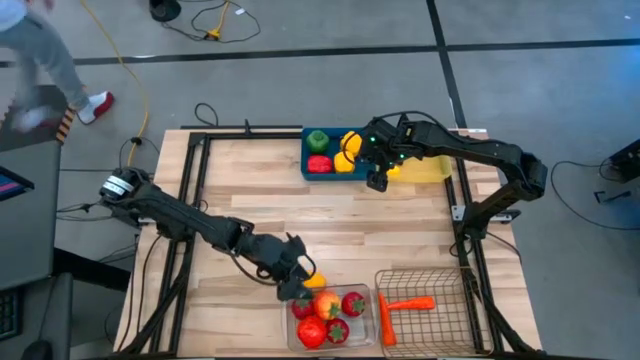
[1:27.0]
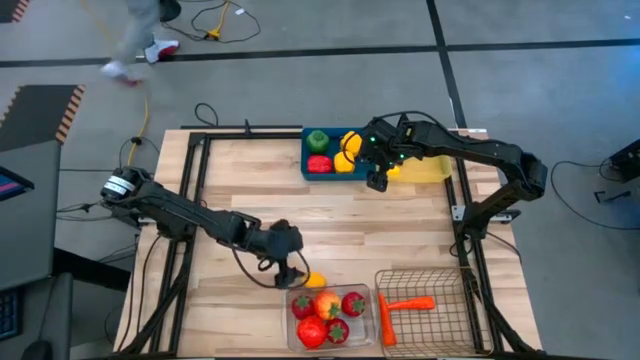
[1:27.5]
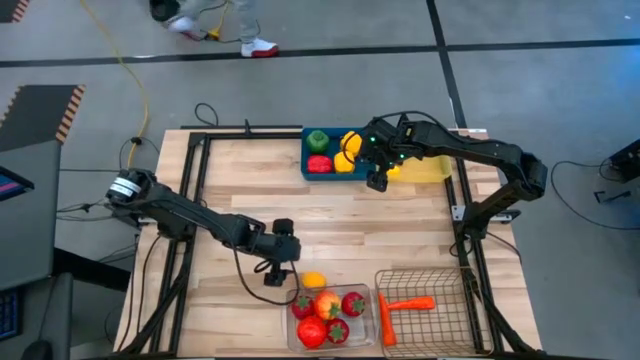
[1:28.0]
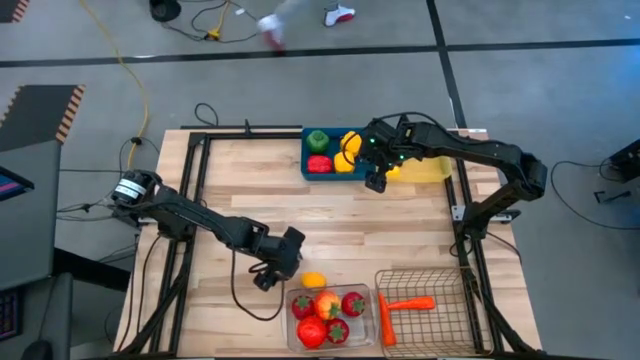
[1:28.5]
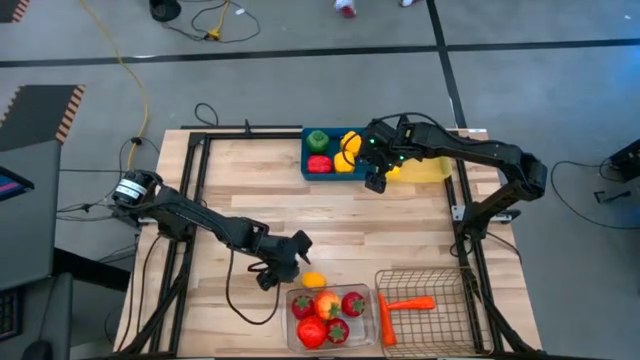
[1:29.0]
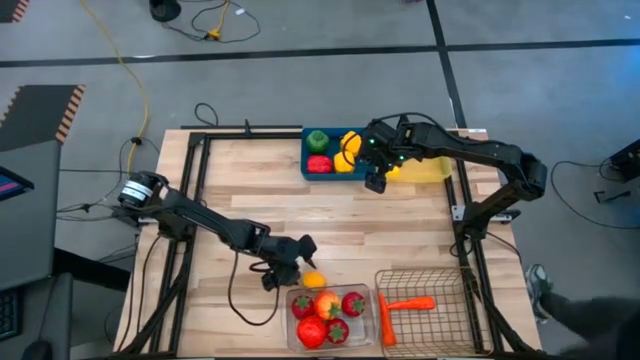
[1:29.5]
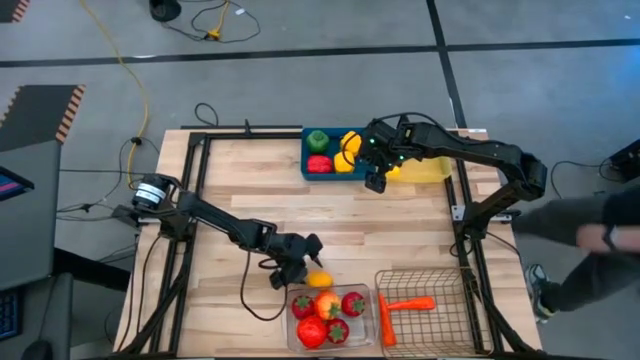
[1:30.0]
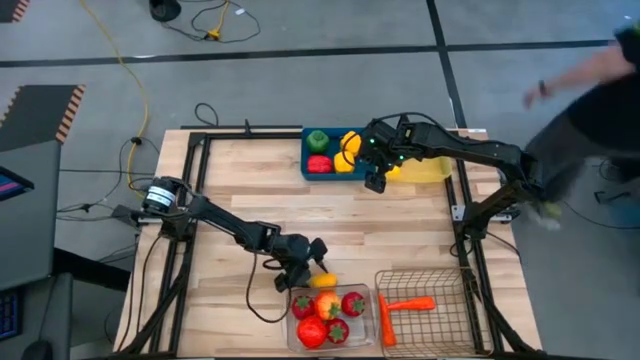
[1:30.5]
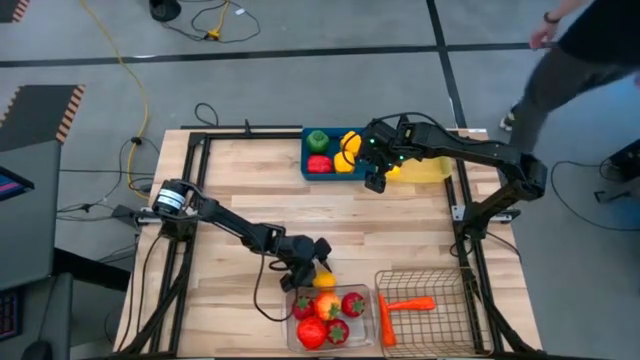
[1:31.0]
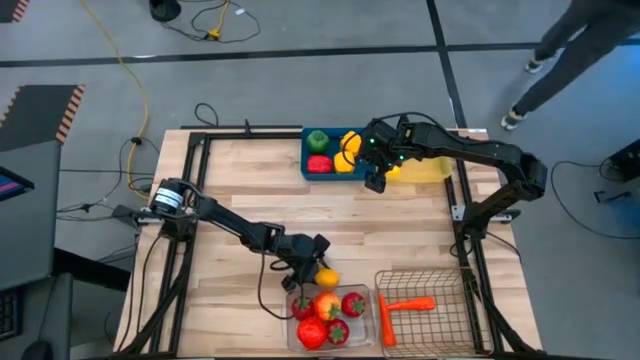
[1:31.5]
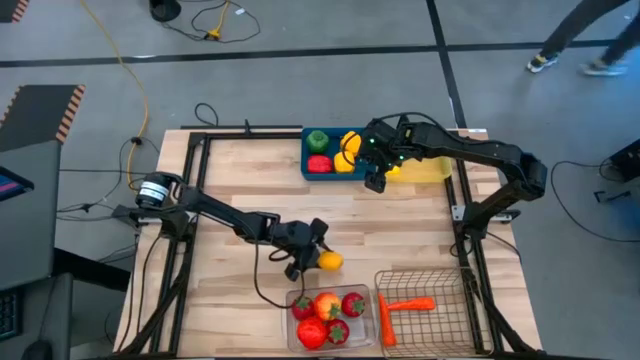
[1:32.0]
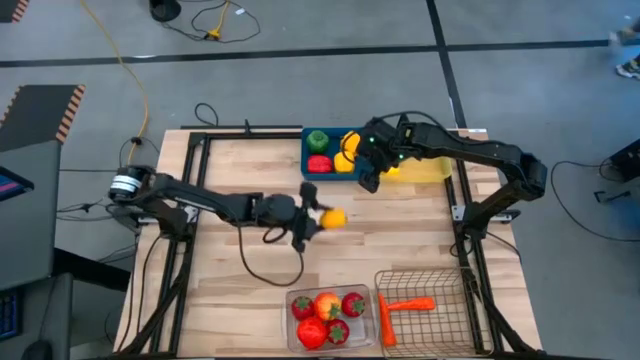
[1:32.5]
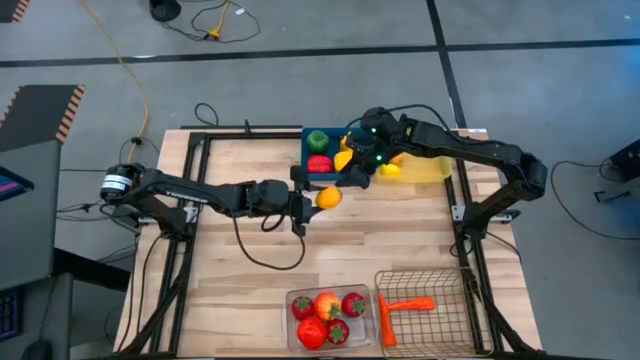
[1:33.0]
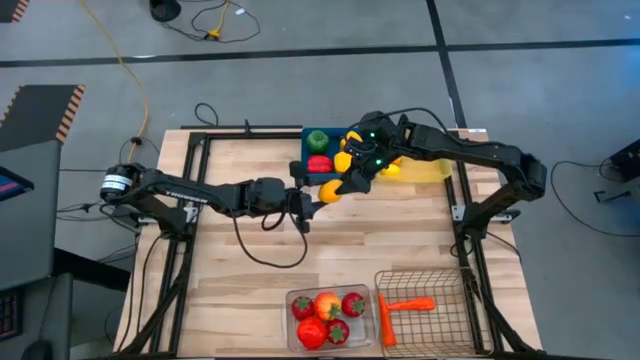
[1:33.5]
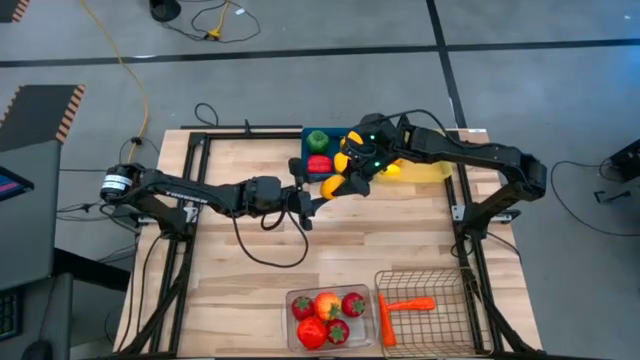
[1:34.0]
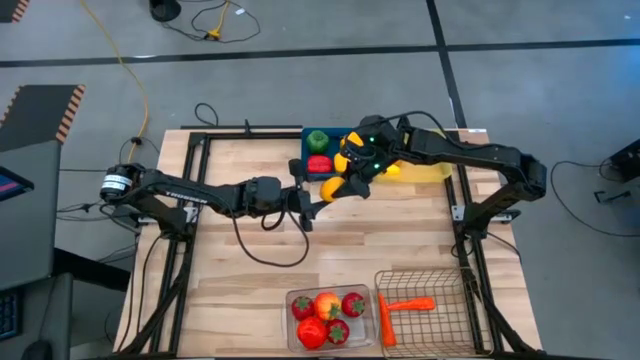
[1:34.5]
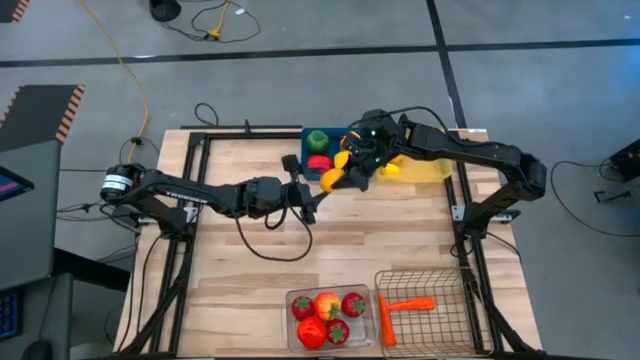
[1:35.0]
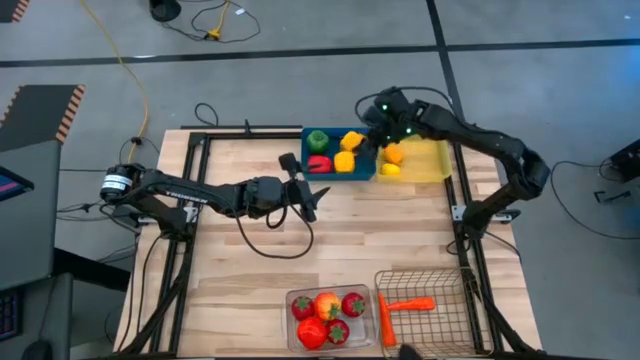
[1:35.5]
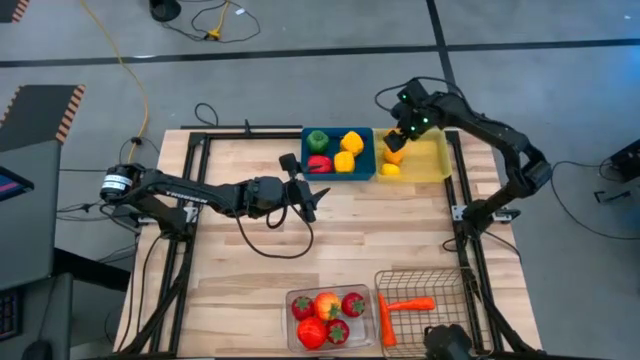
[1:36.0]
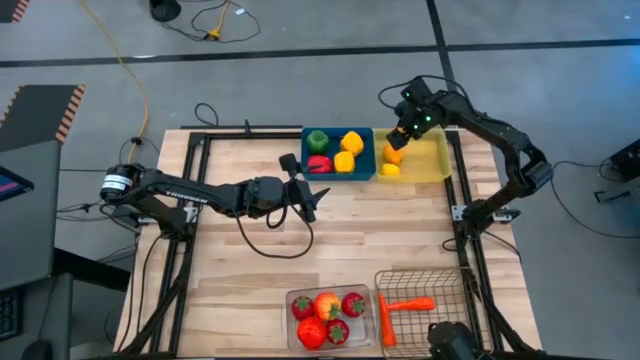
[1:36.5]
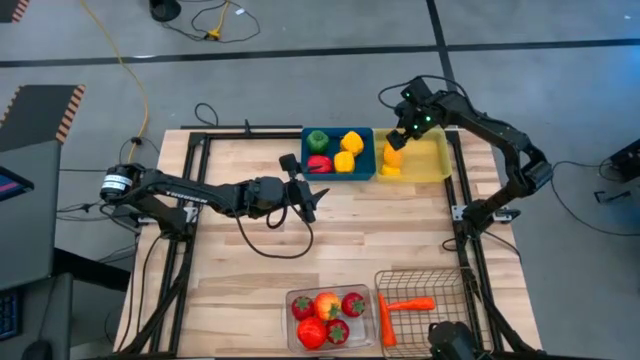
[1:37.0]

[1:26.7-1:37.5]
Task: Sort produce into baskets
Put the lemon into the yellow bin

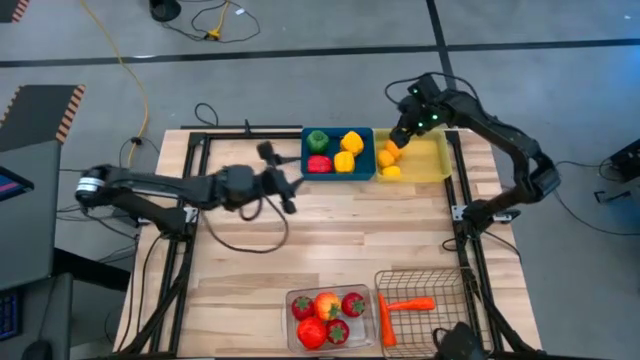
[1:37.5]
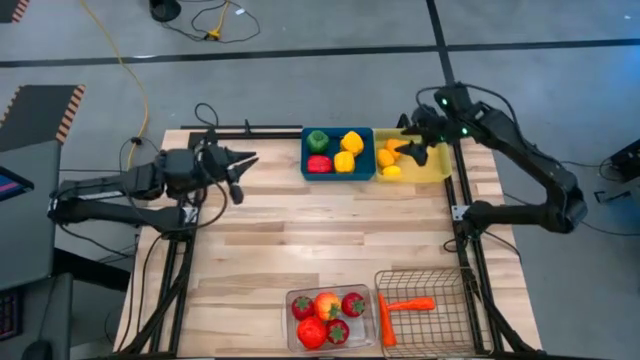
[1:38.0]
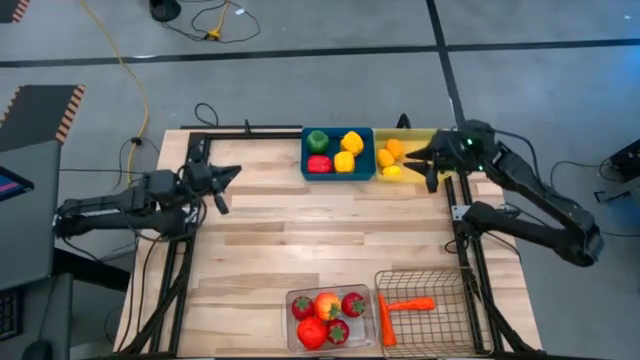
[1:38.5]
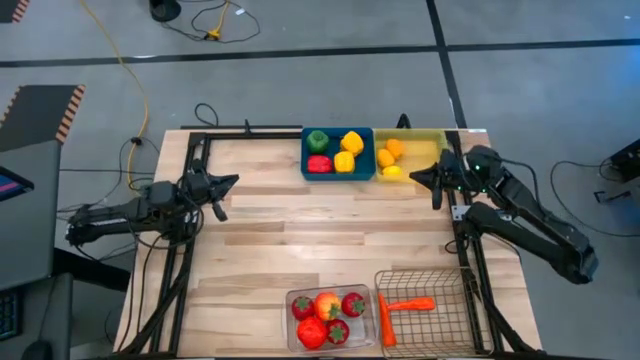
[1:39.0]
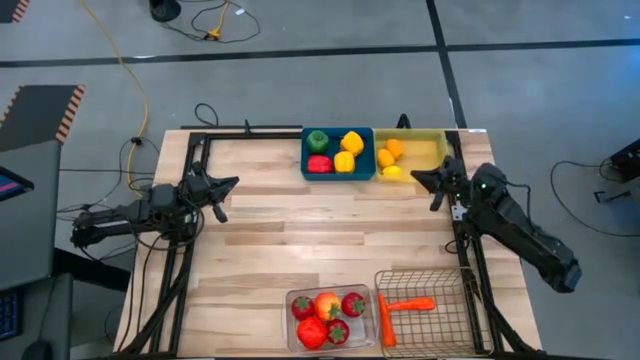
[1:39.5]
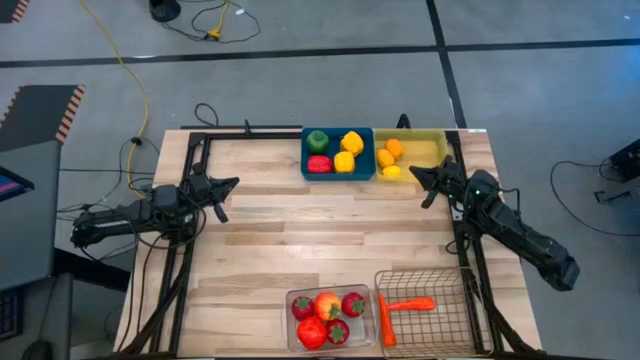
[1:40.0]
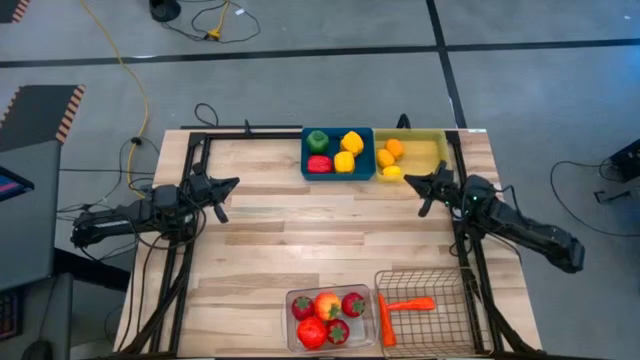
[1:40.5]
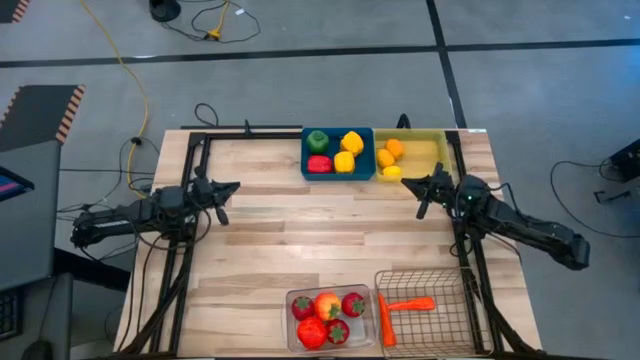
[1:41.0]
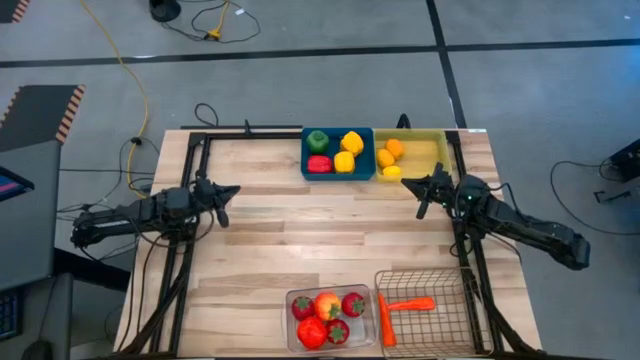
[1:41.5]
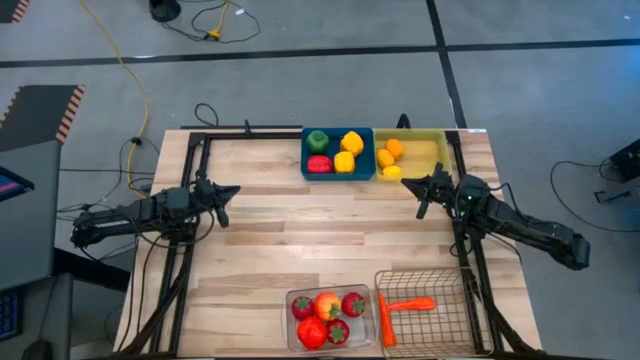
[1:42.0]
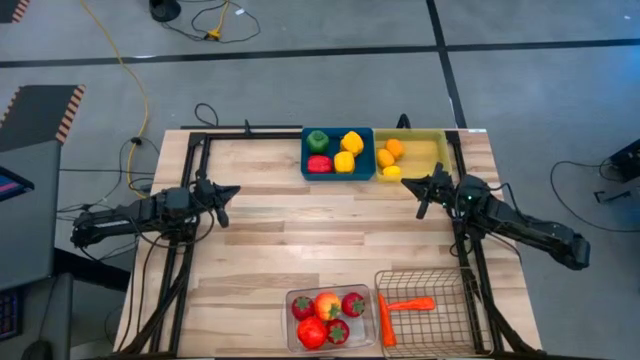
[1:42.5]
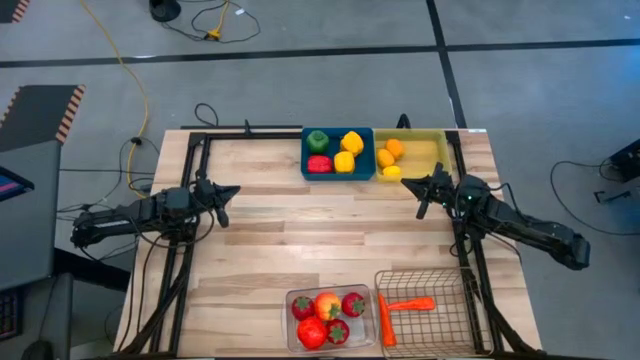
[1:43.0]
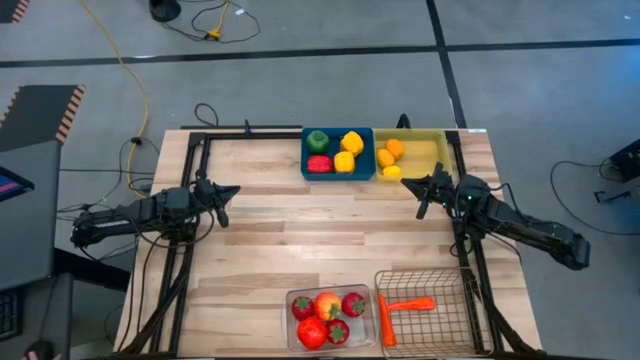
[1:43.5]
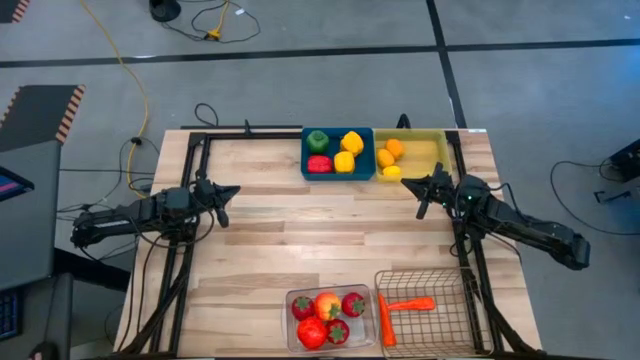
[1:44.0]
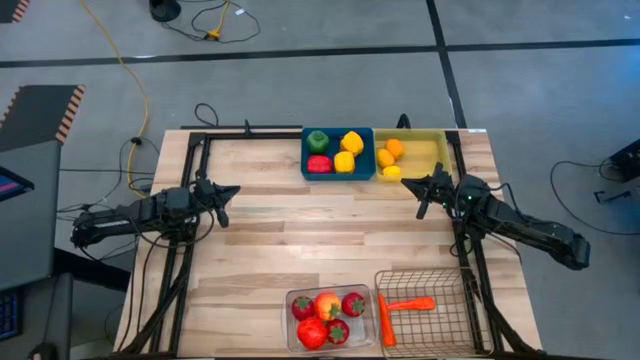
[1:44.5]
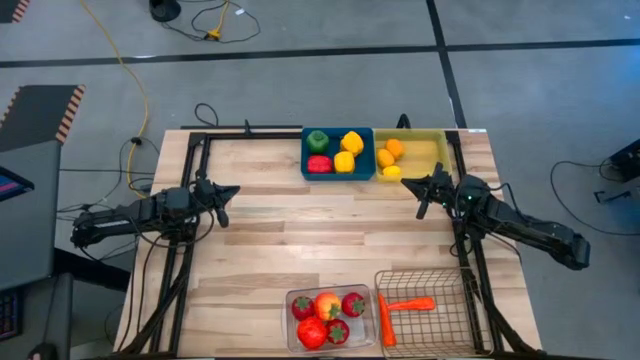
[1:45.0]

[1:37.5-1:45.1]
Return to Home Position

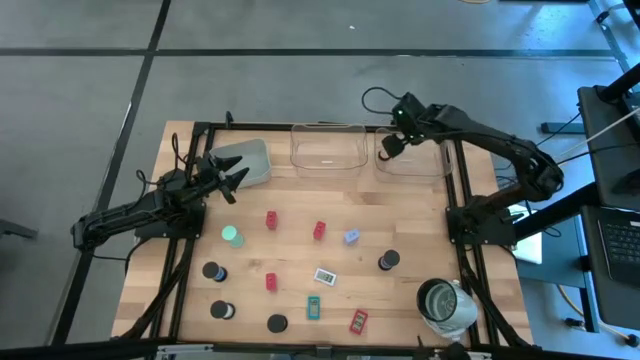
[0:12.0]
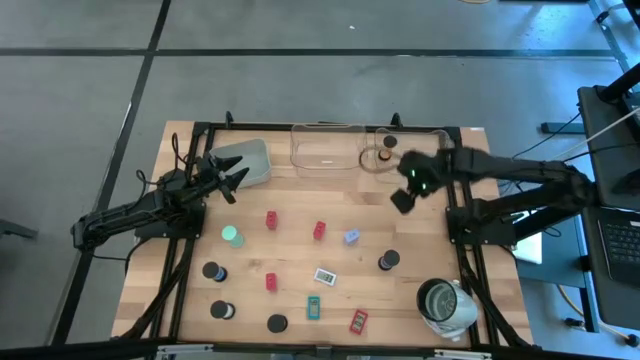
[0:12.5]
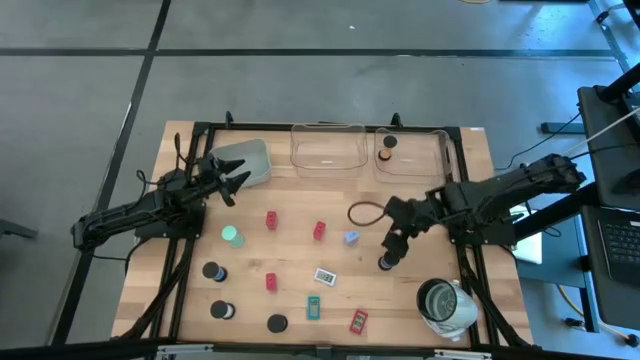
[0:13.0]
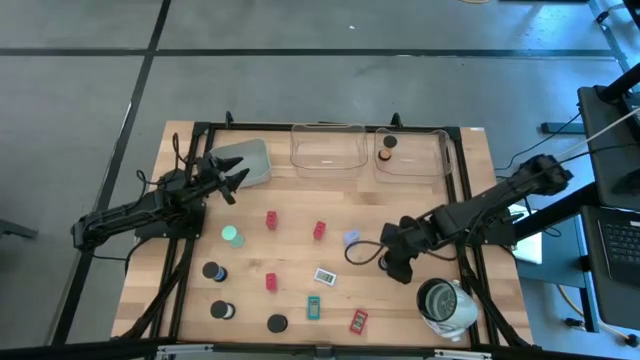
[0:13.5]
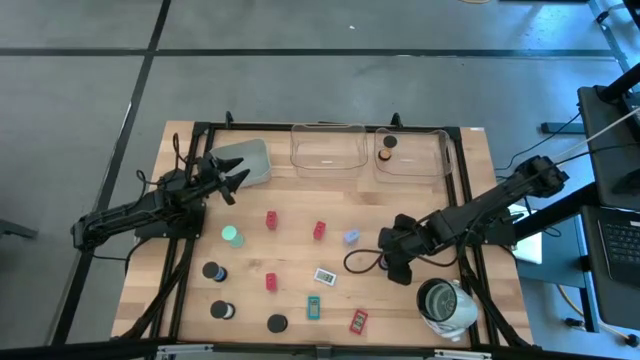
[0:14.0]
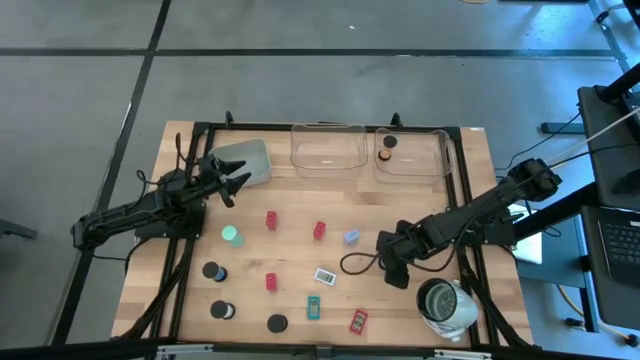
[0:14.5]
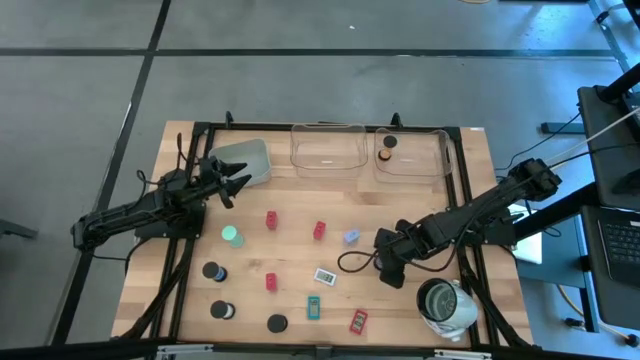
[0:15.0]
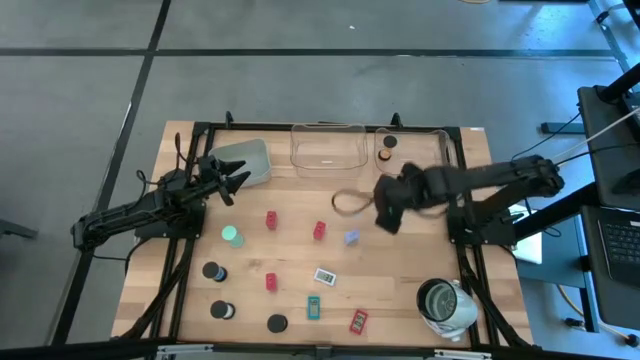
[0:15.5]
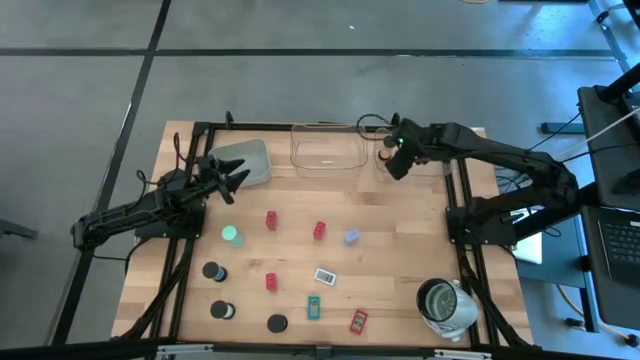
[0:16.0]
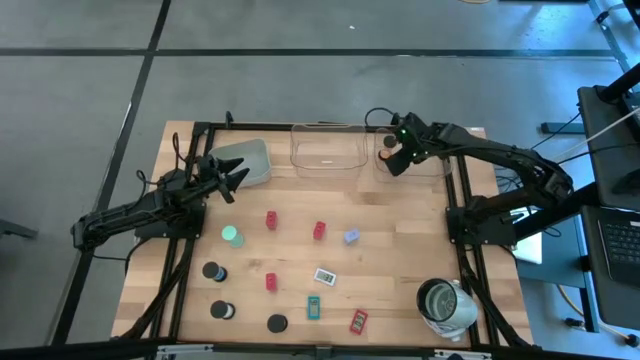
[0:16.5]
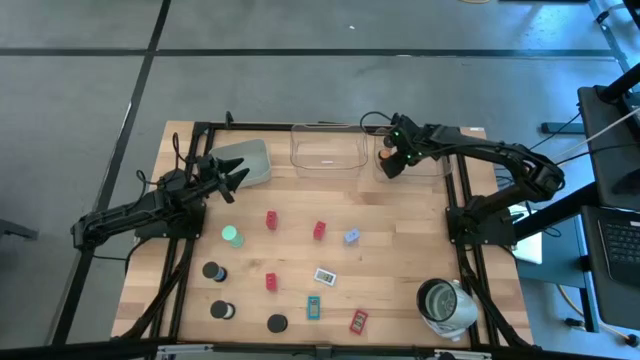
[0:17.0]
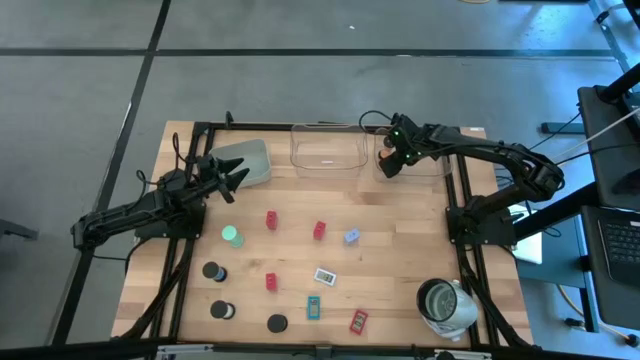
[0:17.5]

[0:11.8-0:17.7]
Task: Pick & Place Office items
Put the right blue hourglass into the right transparent bin
